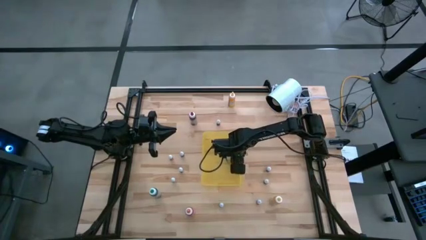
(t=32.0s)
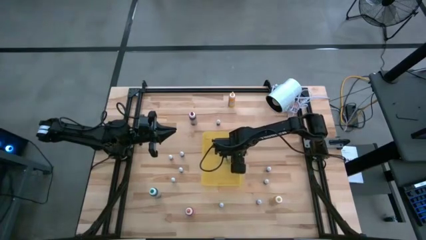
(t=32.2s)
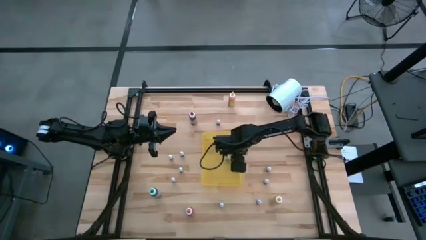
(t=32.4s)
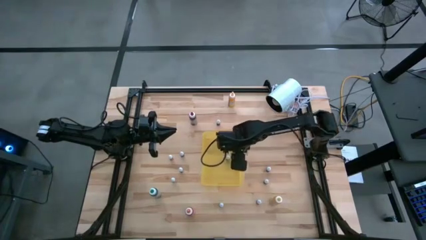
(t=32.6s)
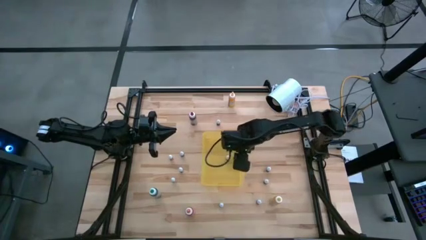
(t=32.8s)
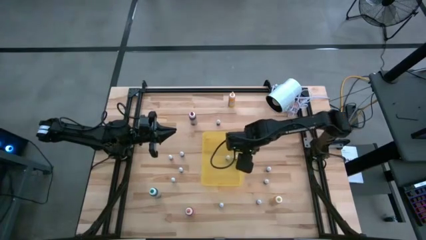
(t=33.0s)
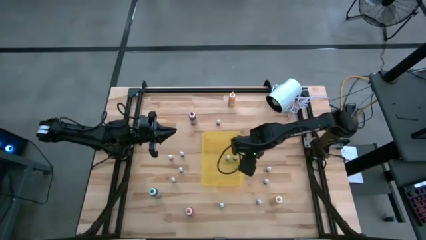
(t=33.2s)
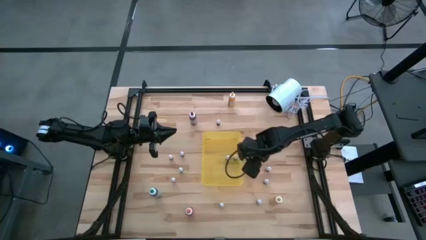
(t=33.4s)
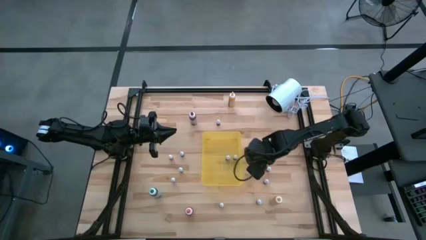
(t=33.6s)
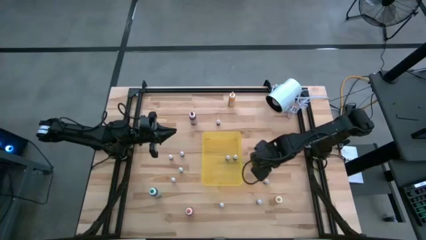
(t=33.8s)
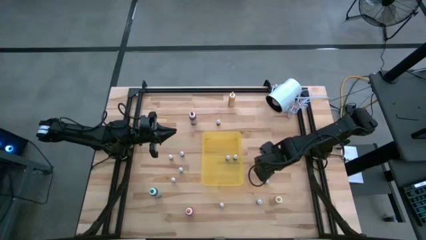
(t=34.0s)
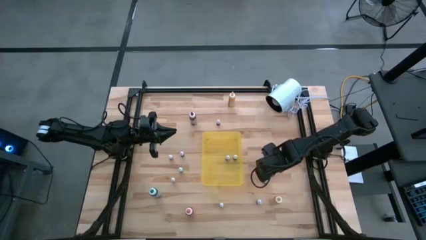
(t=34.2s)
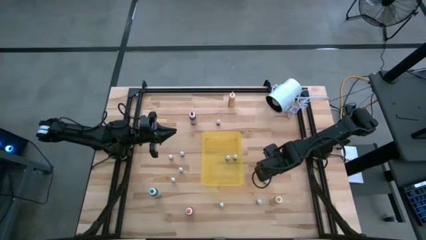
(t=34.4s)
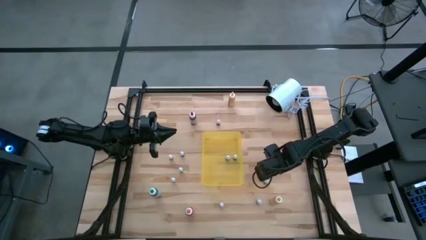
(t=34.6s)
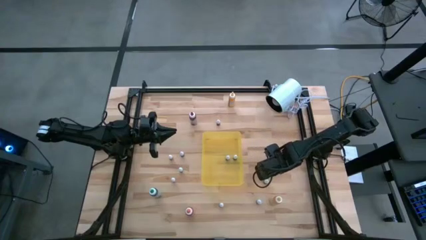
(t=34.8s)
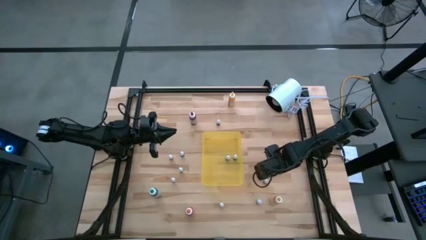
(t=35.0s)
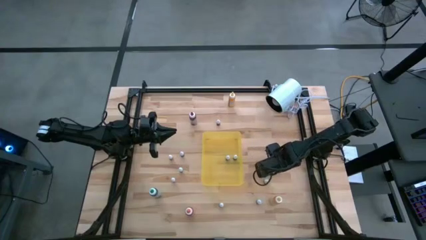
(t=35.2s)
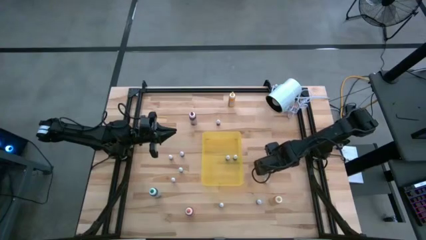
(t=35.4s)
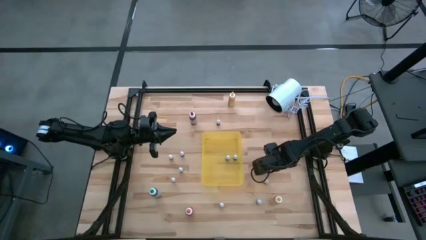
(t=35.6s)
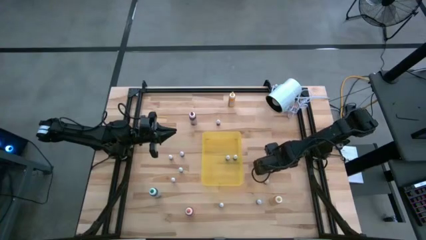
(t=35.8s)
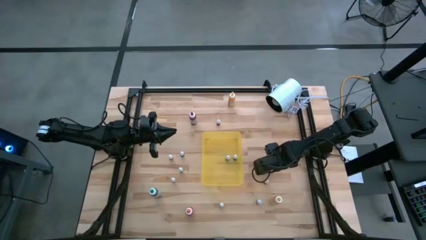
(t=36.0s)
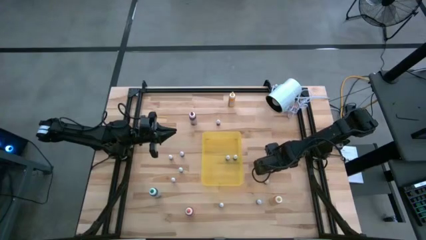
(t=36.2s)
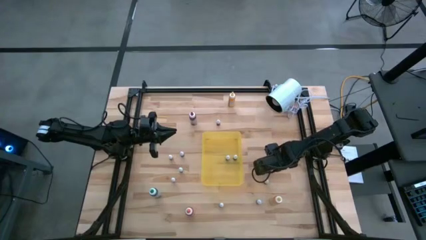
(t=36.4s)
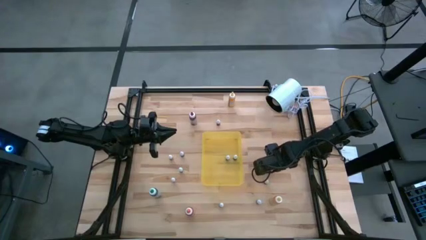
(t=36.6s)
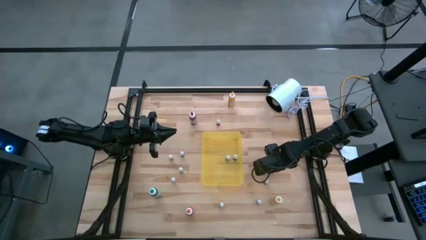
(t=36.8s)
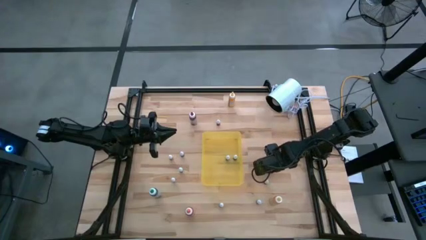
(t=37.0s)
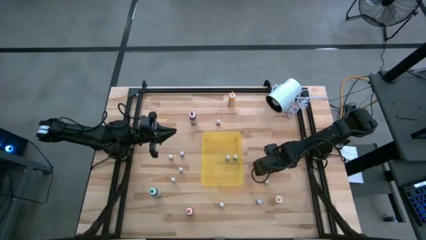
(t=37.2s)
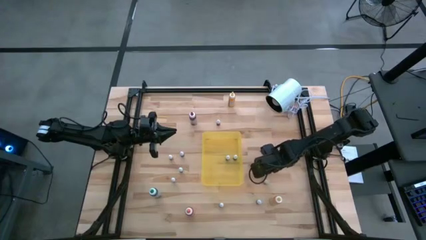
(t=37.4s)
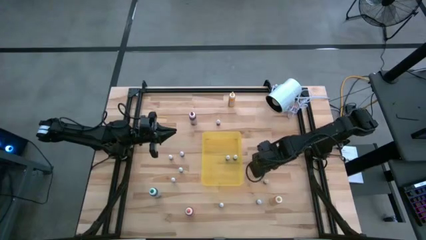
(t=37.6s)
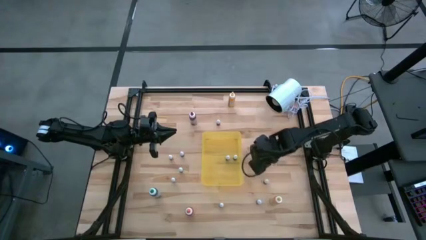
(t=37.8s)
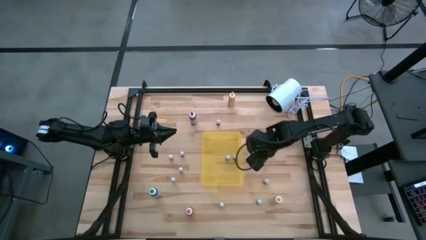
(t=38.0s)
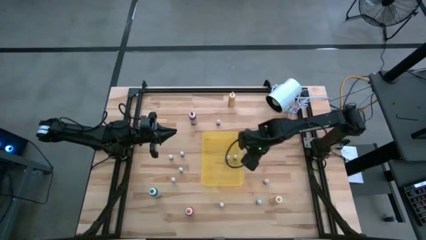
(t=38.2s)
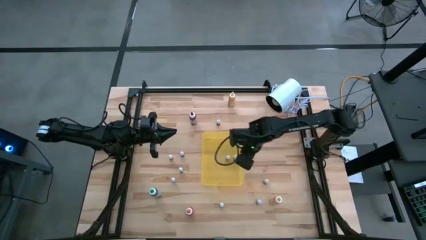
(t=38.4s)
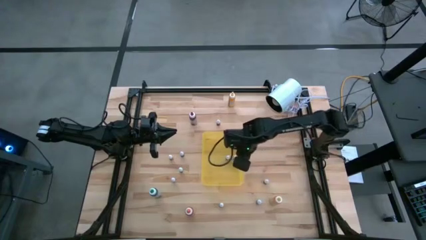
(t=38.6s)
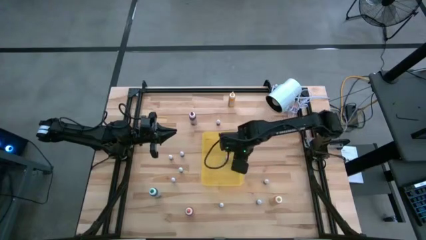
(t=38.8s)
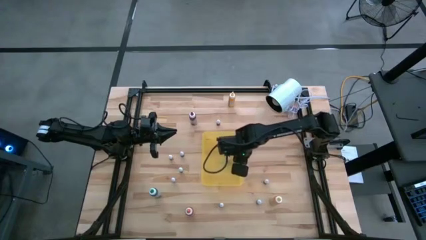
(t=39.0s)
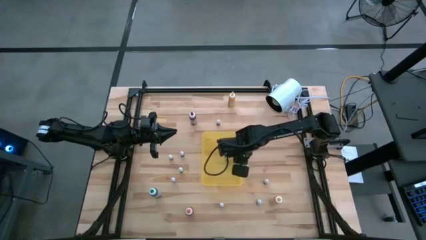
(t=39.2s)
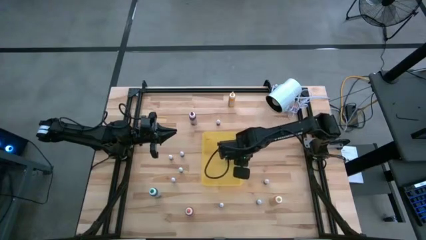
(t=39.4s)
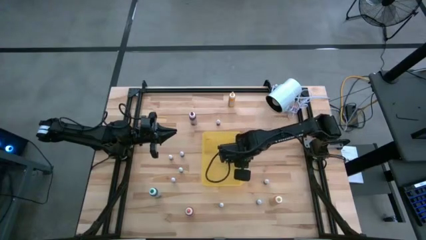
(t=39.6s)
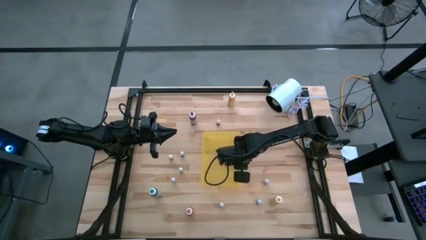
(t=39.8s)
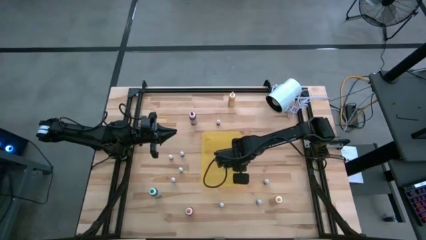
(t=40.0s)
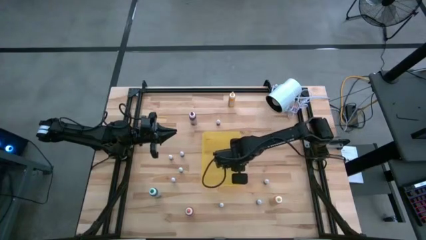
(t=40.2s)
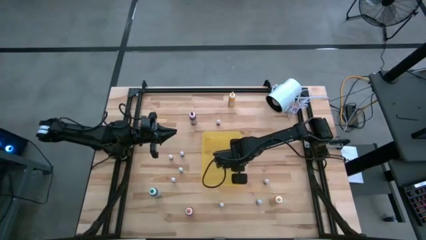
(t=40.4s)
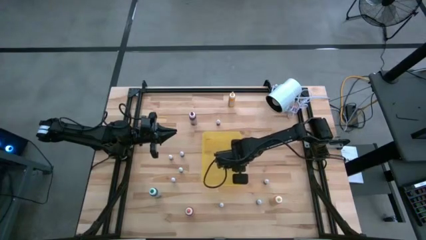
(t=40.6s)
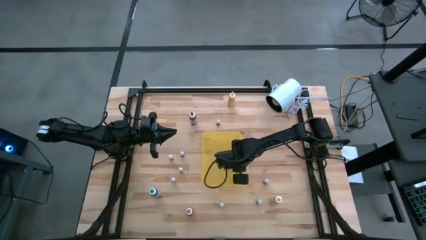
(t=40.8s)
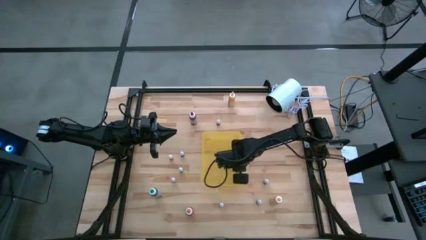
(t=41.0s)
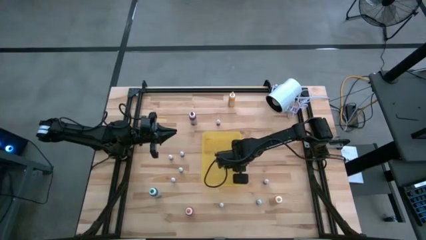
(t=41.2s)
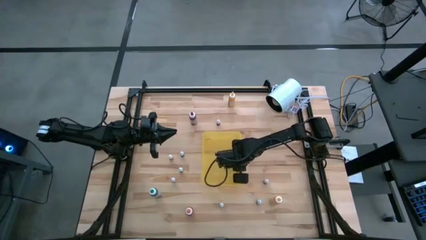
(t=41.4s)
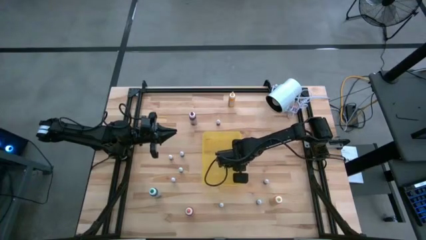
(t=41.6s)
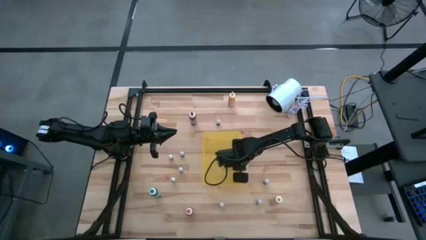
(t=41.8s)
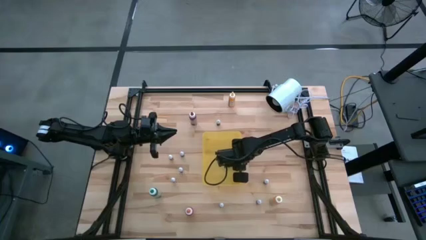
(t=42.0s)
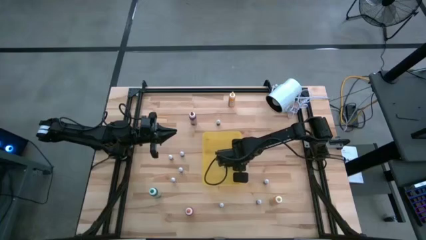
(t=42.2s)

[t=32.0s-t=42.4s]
Task: Pick & Place food coloring
Put the right small green food coloring bottle into the yellow bin
